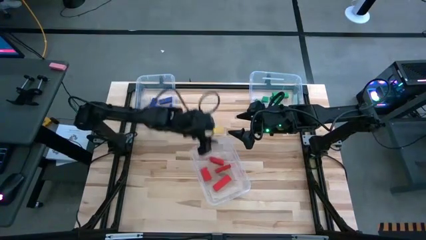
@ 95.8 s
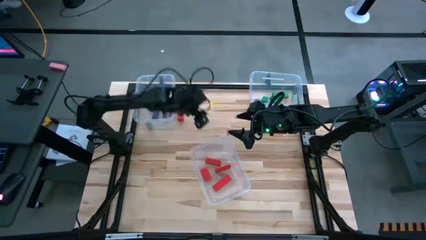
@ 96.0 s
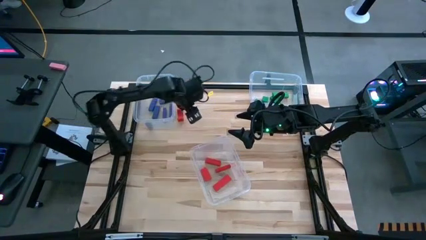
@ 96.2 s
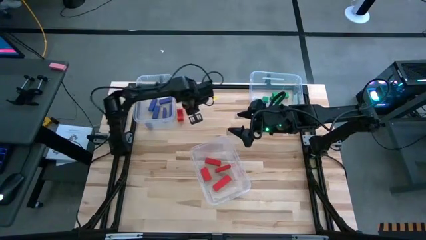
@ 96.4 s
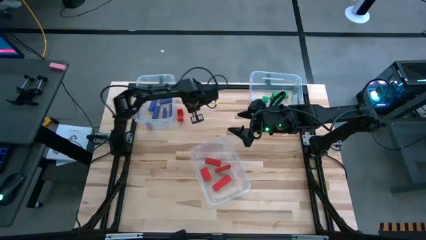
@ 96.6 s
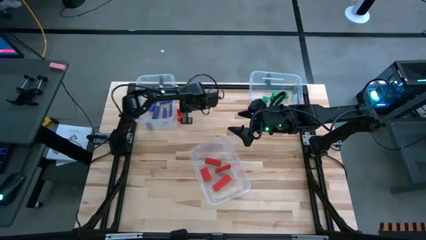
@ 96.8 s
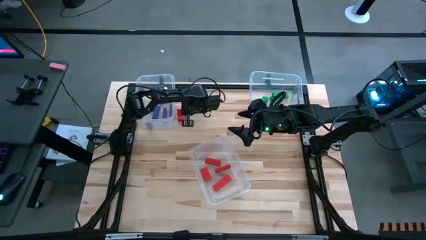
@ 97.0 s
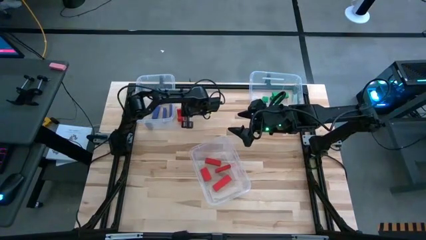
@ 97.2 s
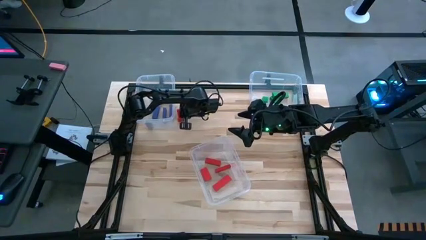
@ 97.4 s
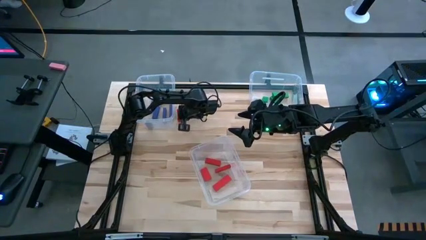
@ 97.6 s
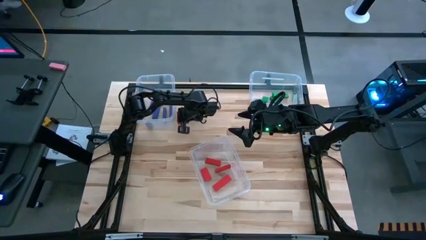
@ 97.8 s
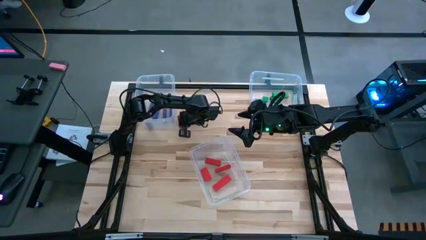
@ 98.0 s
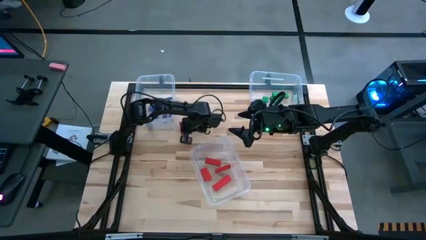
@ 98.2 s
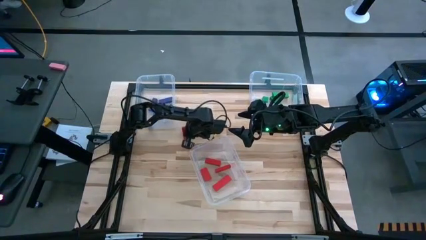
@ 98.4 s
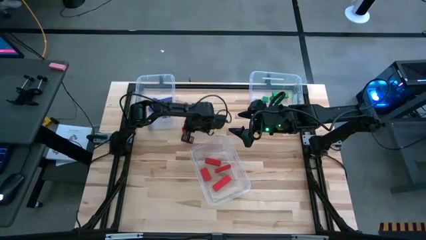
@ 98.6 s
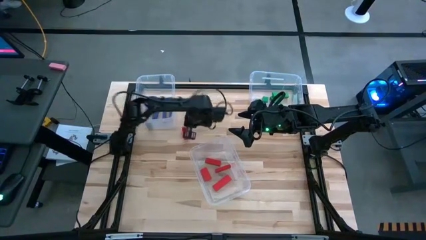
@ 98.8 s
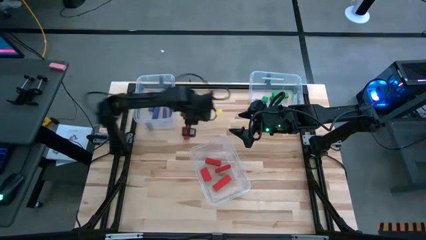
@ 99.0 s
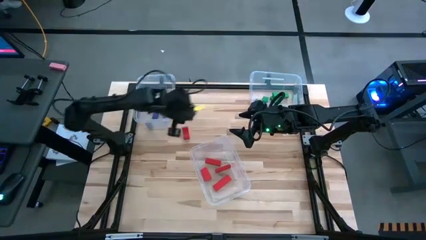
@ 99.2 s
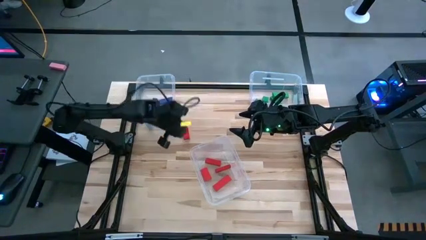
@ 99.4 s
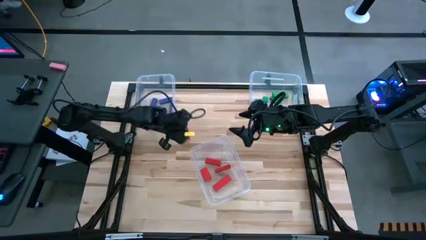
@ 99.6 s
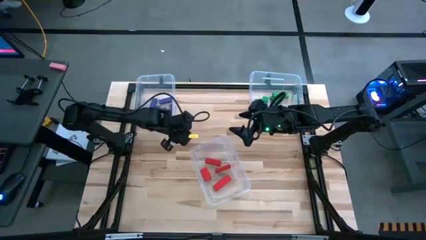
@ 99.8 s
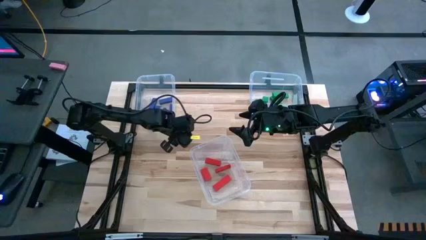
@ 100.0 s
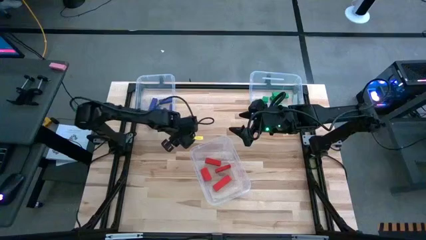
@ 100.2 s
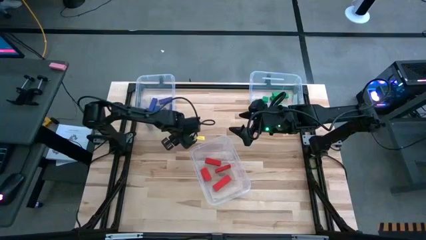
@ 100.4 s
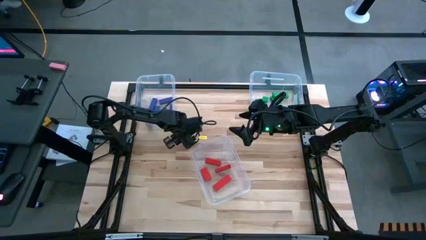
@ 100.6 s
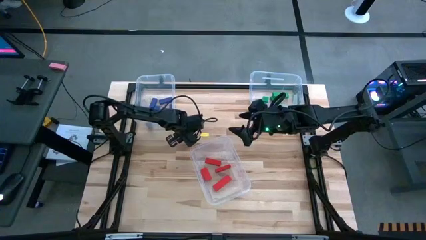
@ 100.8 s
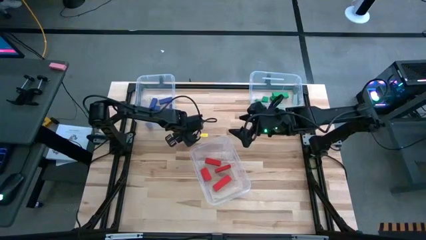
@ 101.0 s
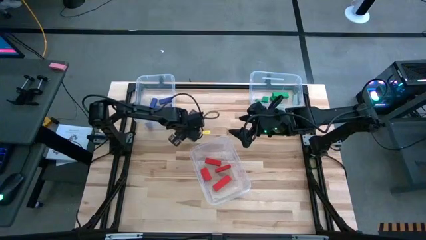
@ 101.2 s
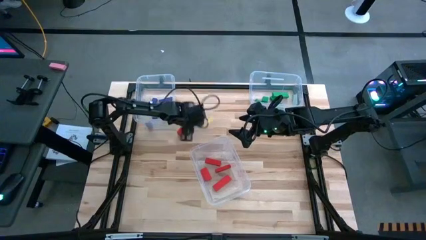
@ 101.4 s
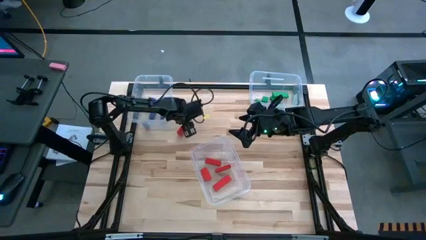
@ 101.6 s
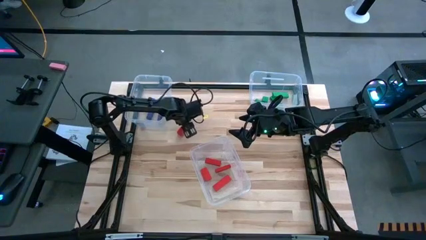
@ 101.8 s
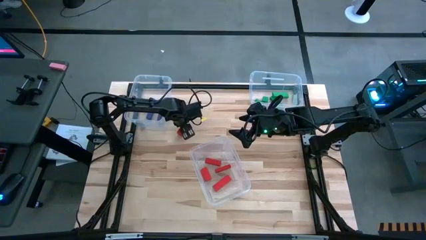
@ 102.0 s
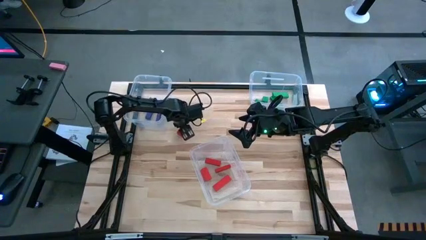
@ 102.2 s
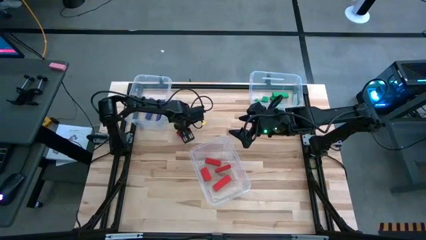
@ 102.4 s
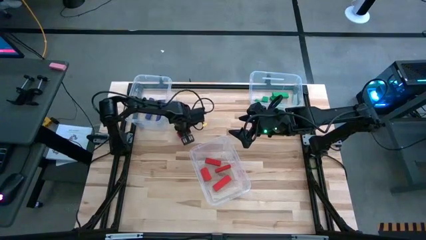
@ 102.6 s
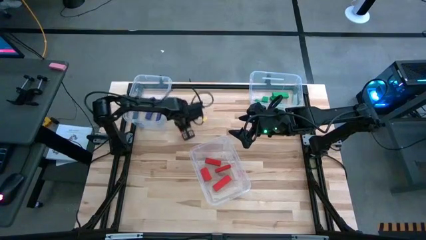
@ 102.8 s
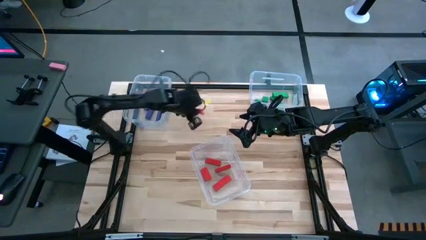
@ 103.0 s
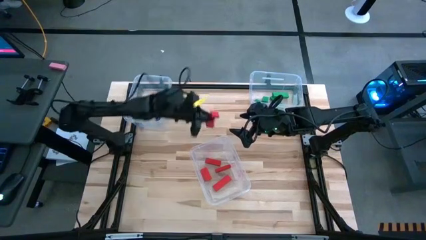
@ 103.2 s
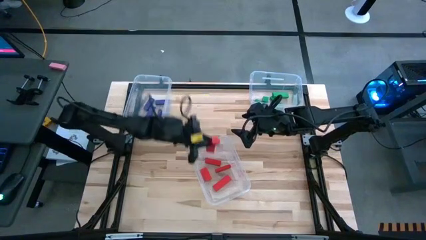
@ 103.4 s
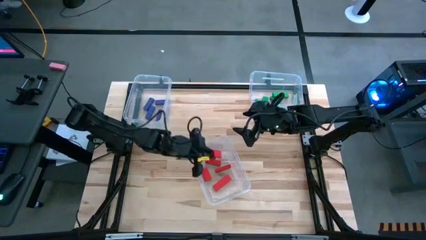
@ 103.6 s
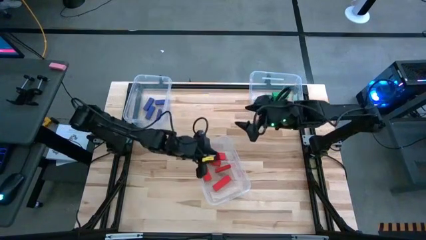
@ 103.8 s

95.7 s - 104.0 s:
Task: Sort blocks
Put the block into the bottom transparent bin

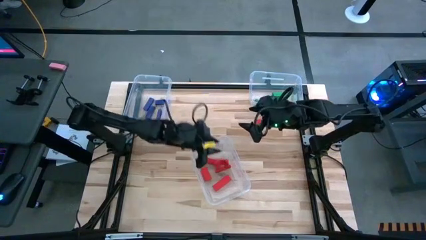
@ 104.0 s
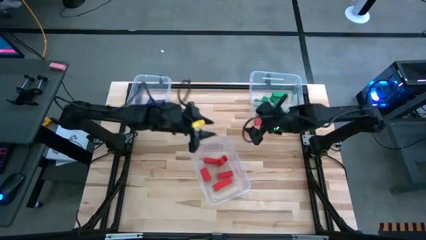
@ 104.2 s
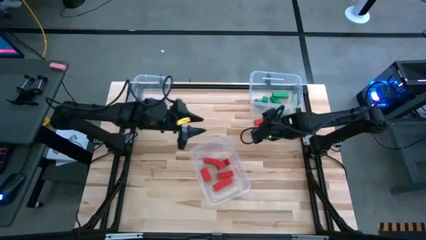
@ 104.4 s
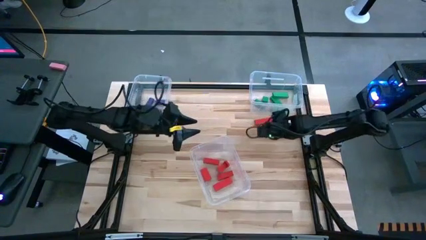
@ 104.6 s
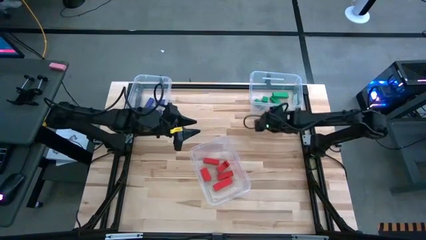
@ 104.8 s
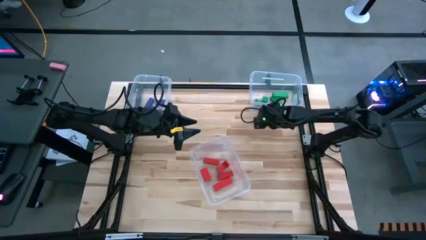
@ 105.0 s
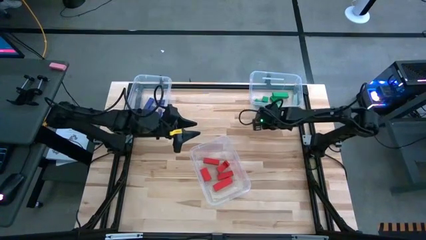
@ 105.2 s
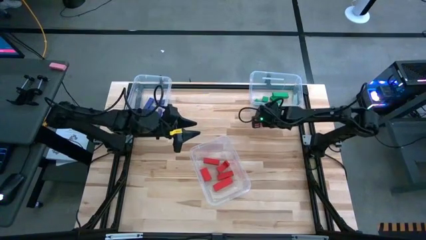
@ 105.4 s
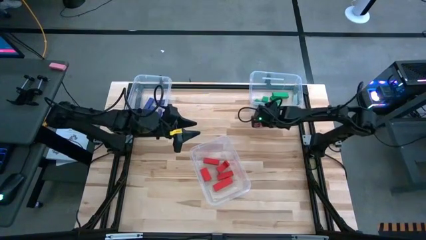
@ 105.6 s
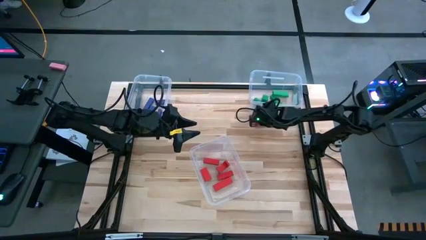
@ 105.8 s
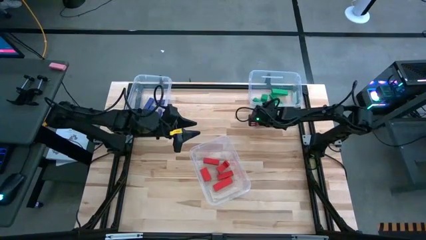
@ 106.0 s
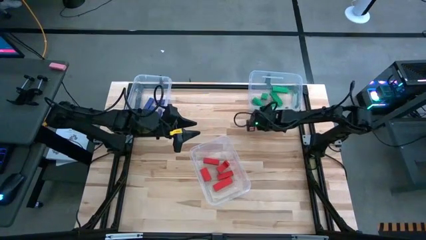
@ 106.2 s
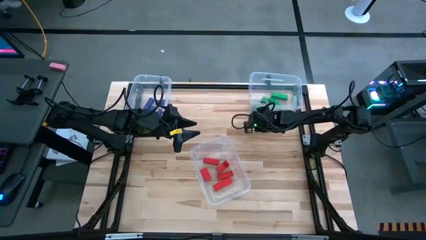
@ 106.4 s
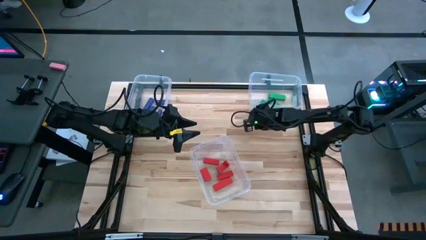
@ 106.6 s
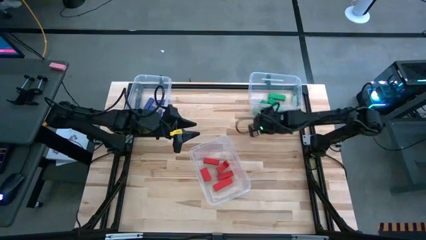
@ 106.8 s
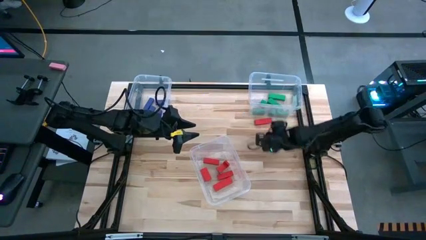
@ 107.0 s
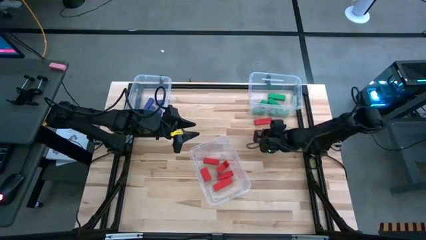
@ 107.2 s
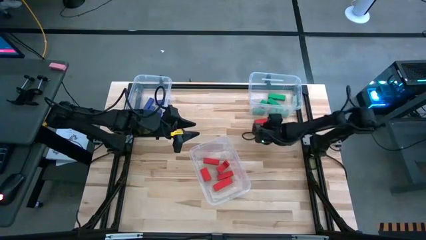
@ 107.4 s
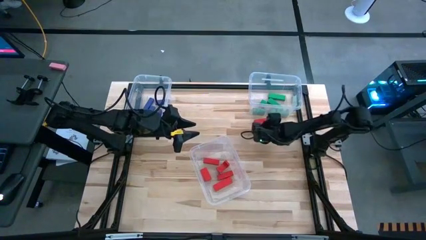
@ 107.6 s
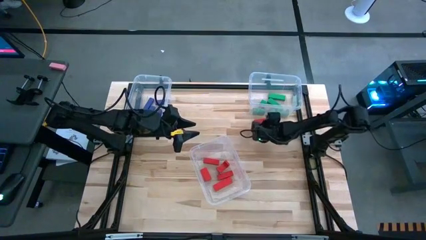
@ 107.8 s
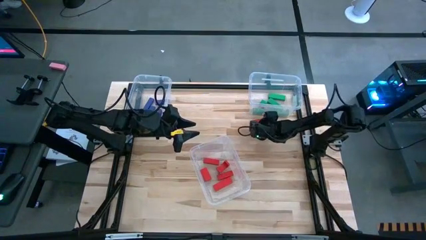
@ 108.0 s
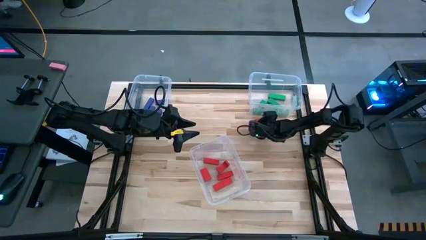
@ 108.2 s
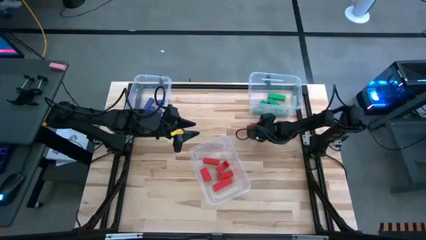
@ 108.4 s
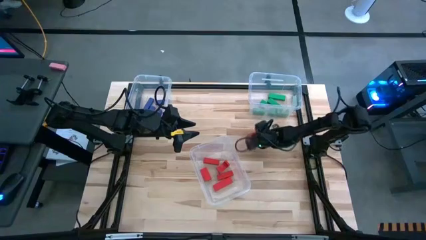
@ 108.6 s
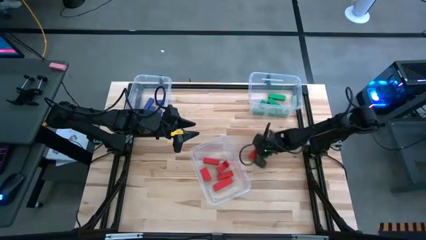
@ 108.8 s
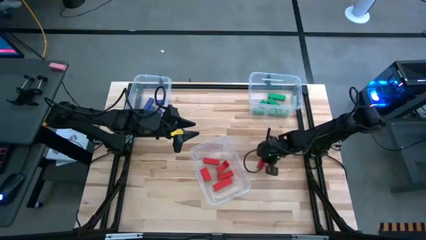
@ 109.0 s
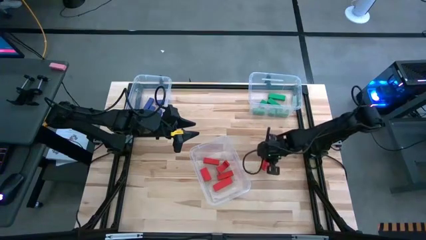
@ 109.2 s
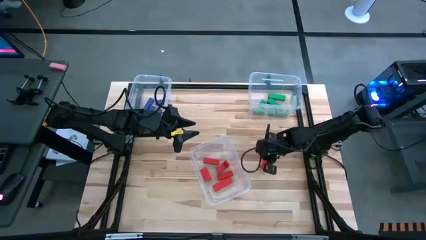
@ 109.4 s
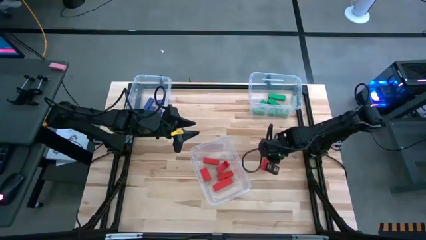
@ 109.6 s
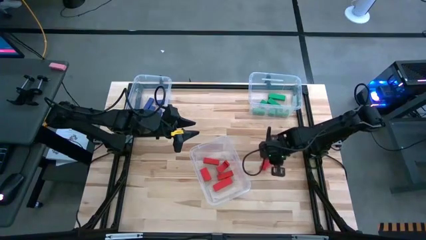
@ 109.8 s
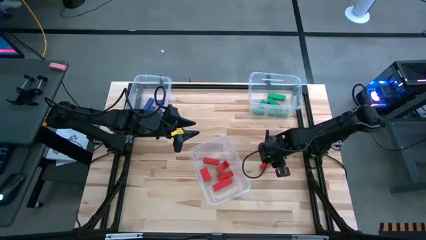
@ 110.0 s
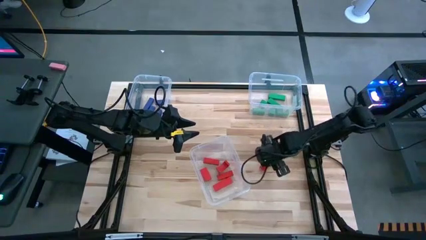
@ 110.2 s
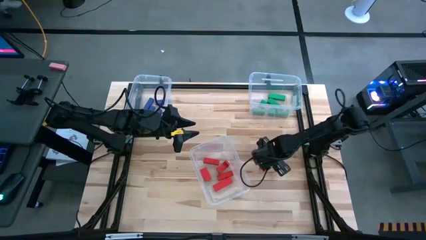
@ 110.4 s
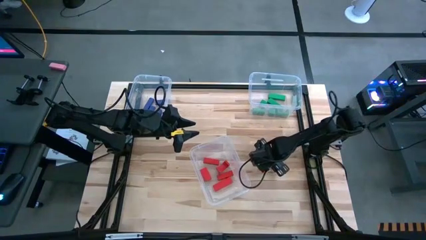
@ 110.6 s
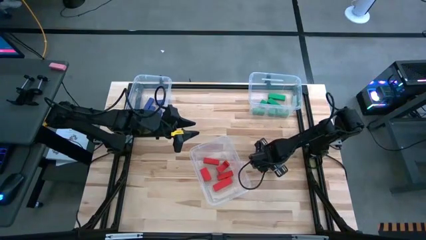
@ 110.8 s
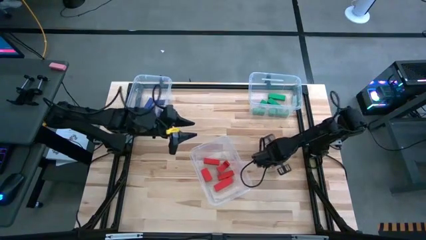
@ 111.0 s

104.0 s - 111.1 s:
Put the red block into the bottom transparent bin

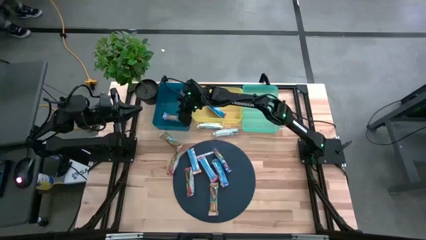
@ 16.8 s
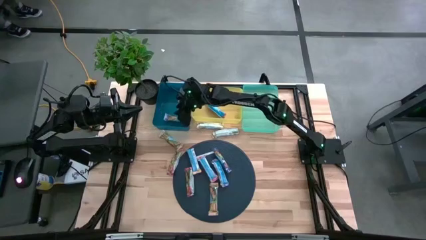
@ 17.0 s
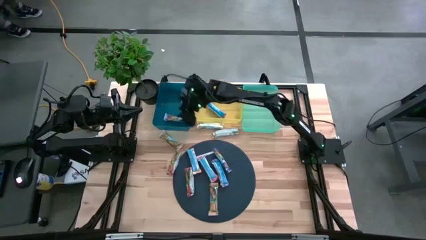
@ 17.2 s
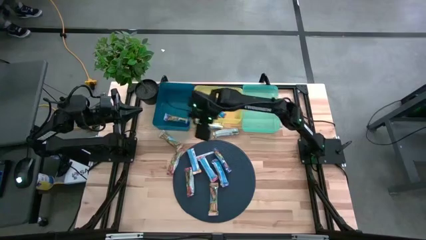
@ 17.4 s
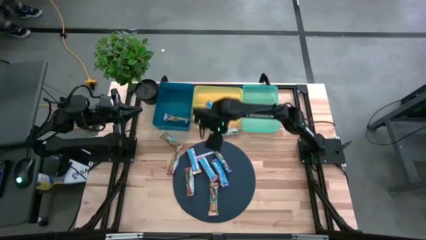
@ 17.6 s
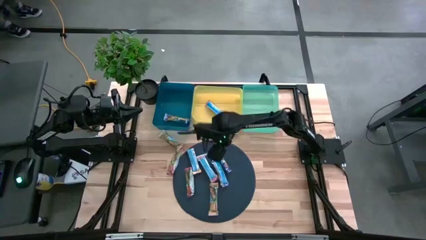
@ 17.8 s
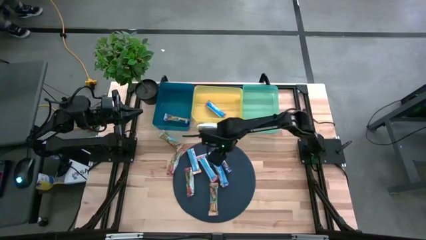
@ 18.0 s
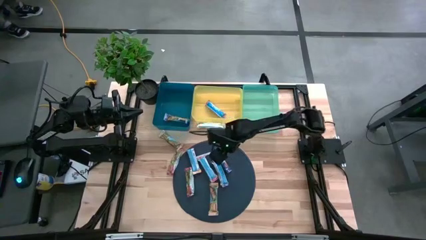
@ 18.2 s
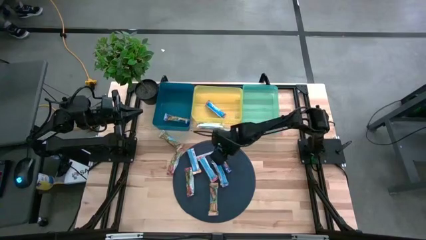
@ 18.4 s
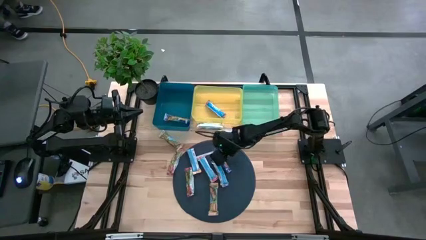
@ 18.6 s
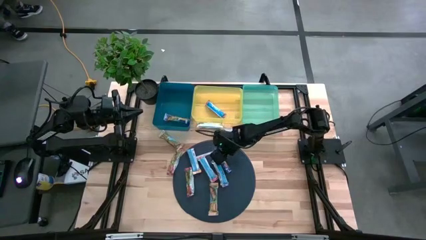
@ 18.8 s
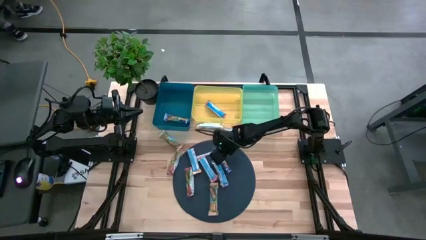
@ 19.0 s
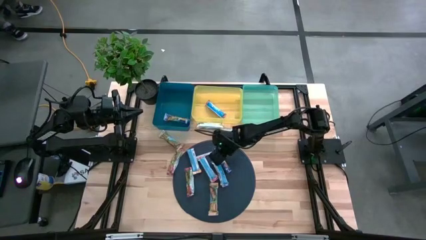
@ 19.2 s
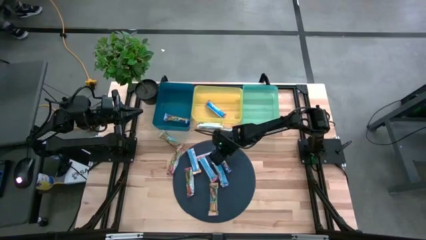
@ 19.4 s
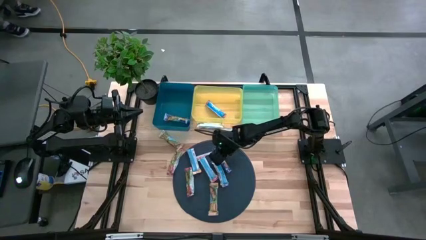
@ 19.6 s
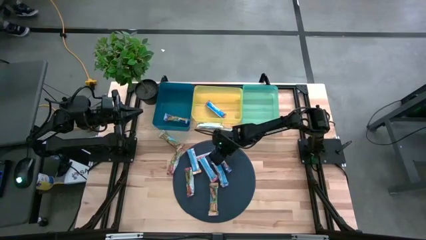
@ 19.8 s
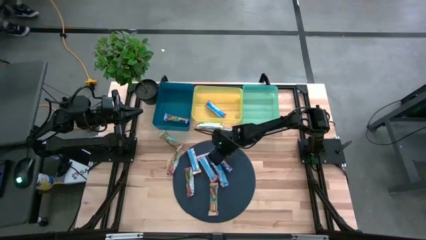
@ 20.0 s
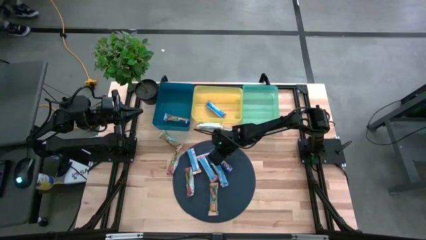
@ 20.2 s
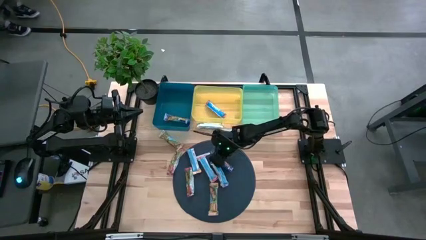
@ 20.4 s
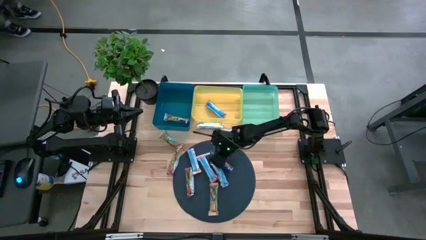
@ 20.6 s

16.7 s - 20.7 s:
Task: Pick and place Granola Bars by type
Put the blue granola bar into the blue bin
